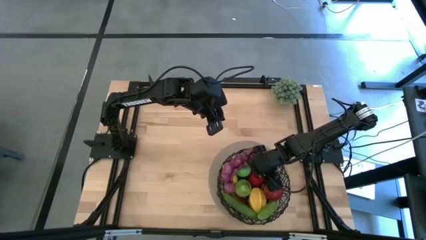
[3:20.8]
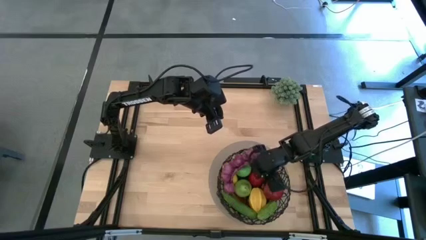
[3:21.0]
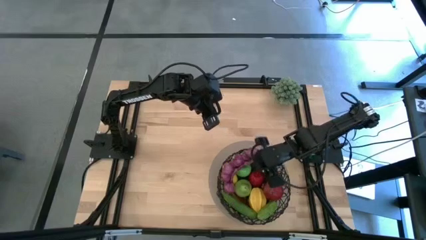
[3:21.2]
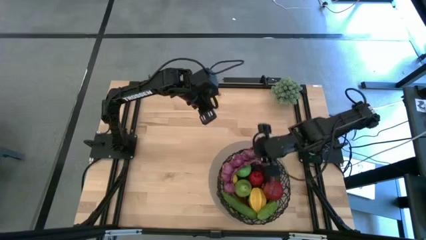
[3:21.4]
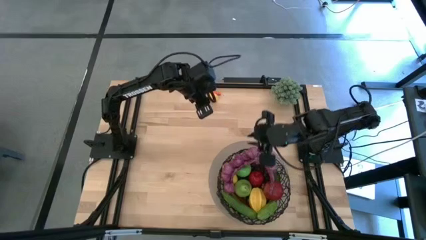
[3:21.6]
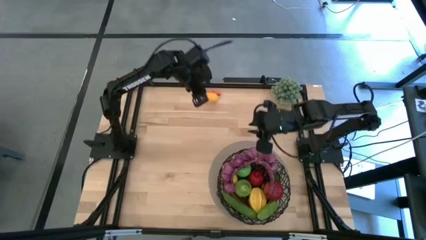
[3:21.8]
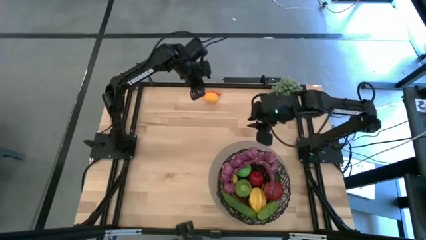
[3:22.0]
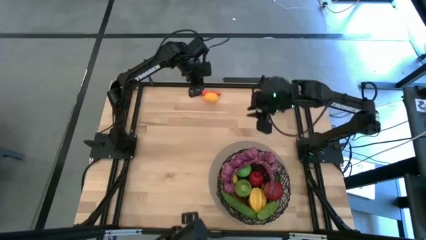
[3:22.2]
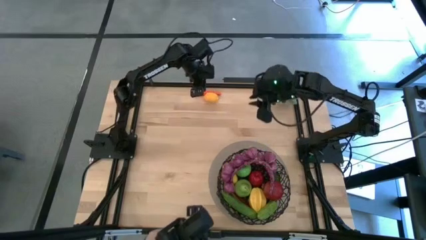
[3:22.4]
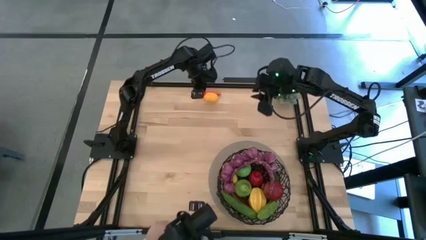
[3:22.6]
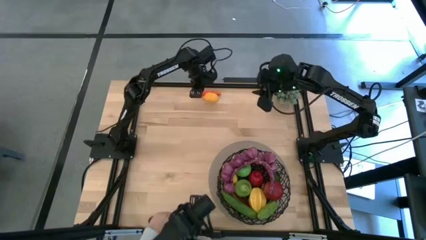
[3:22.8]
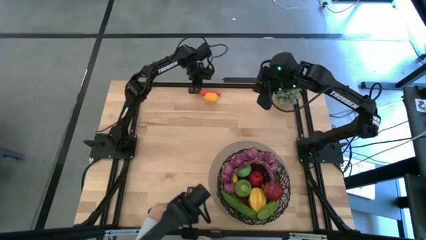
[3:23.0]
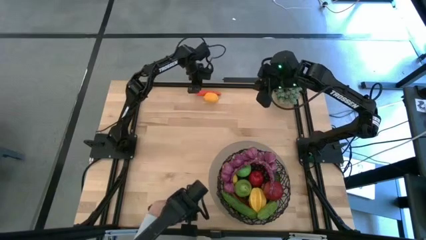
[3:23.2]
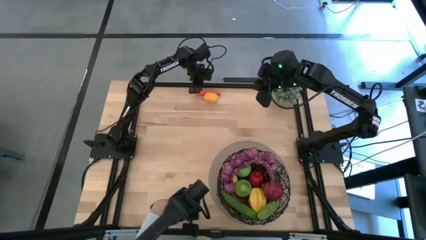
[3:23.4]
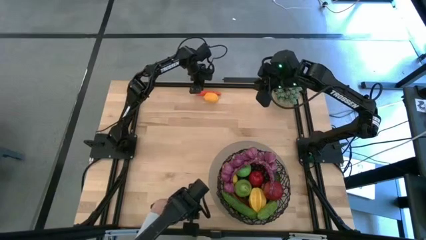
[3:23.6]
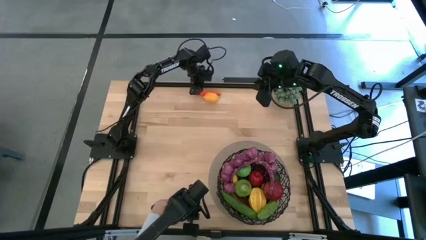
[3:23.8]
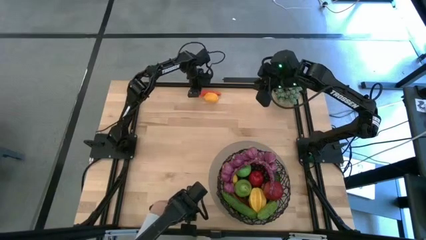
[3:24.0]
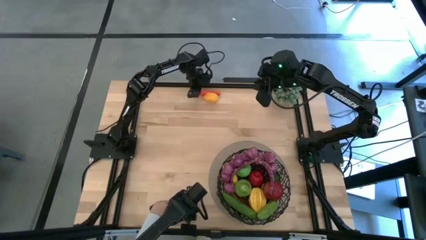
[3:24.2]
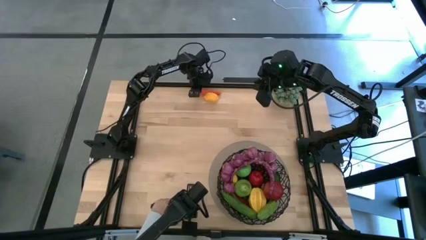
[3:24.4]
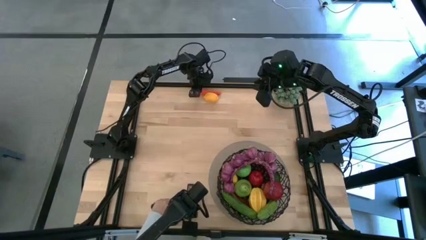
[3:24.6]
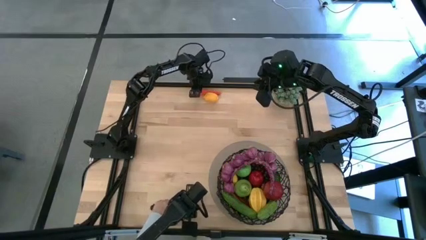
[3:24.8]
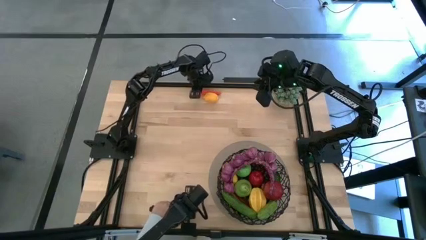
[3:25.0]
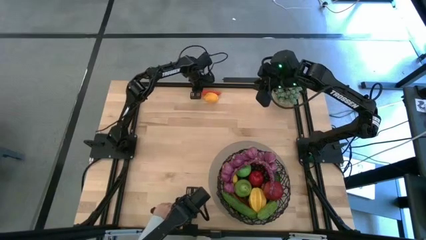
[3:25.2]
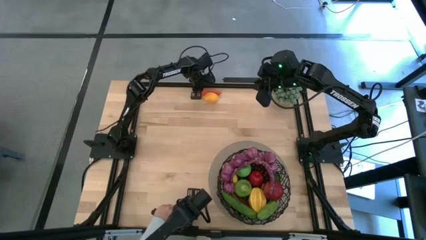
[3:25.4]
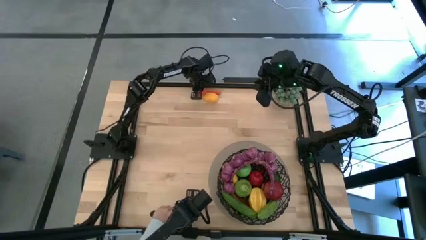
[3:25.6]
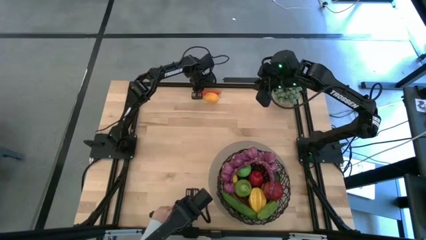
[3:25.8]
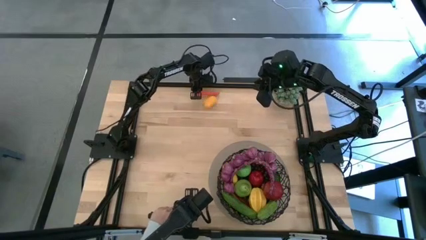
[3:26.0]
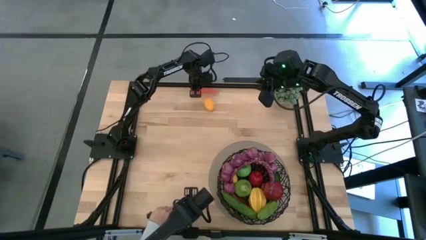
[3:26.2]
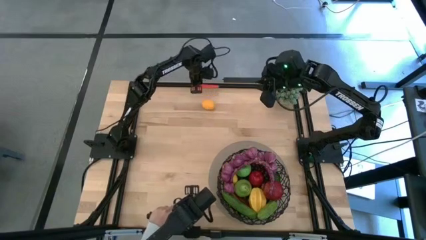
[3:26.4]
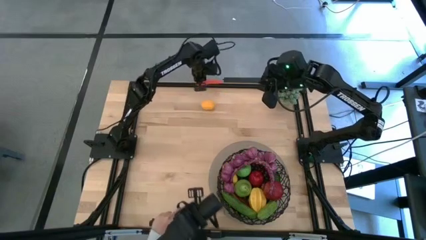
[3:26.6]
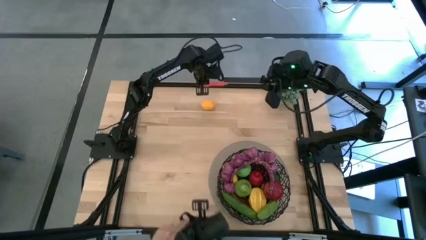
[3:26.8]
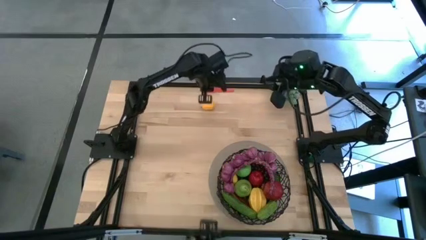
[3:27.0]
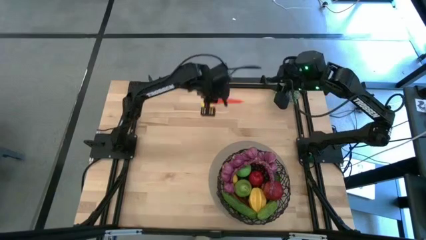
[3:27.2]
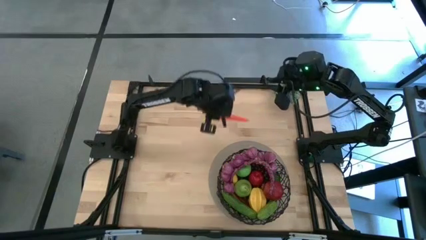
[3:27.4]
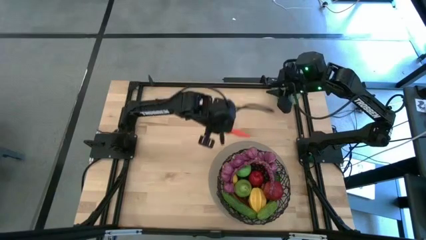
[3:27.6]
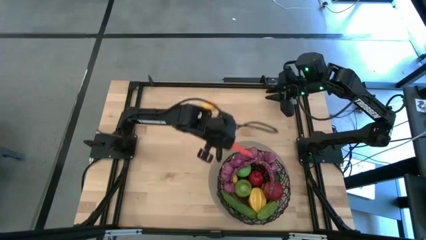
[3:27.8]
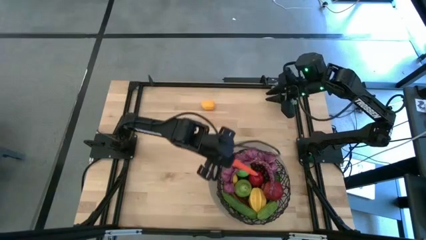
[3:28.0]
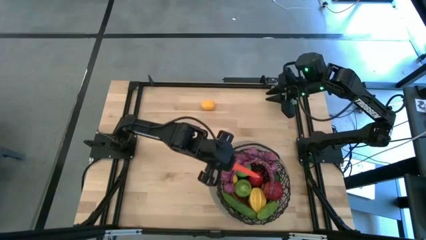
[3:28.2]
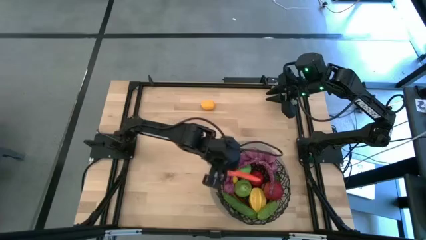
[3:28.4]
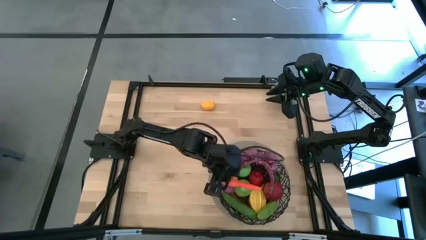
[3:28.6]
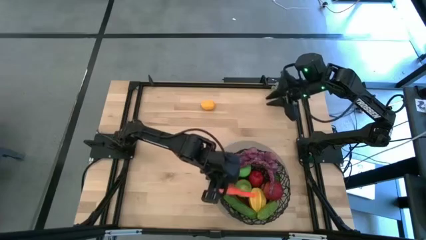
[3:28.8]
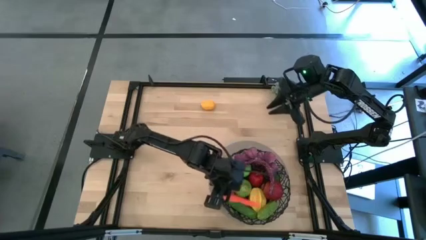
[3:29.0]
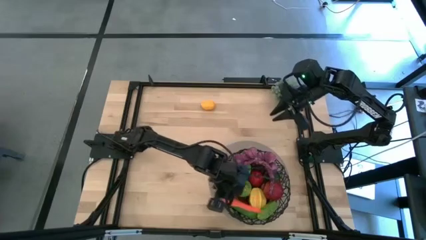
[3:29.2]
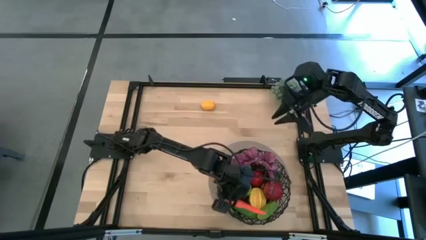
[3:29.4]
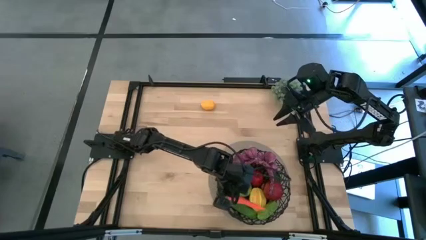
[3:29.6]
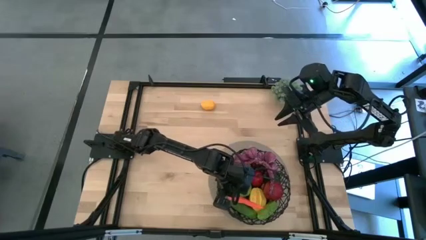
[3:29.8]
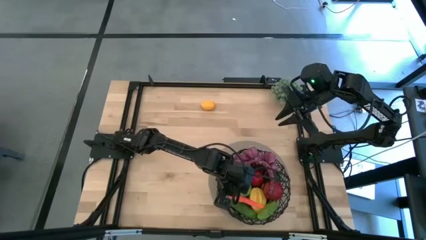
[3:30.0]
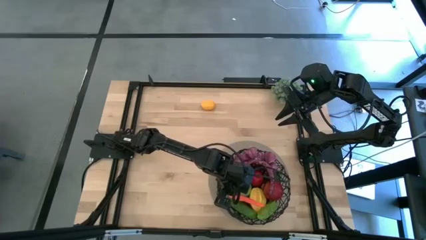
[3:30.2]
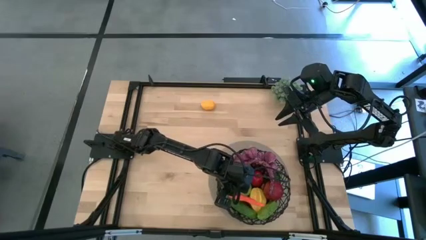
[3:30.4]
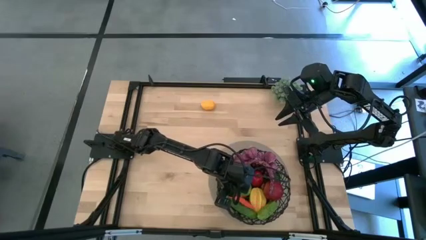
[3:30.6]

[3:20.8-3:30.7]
Task: Build produce basket
Put the orange carrot into the wire basket

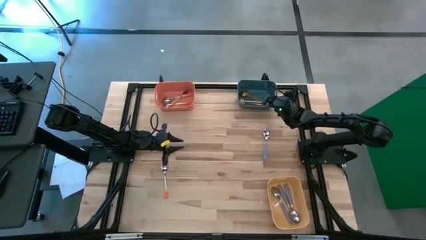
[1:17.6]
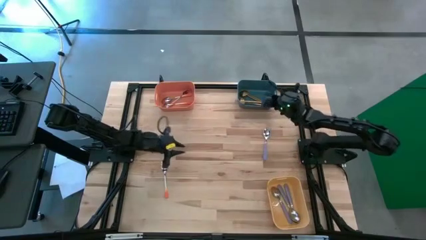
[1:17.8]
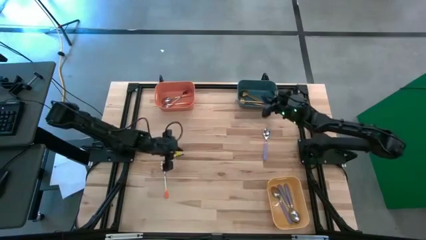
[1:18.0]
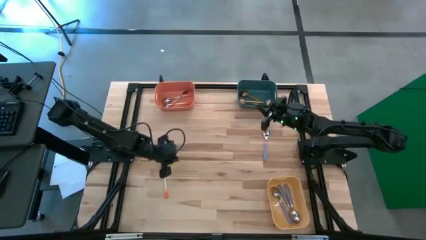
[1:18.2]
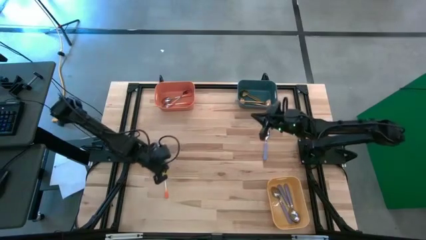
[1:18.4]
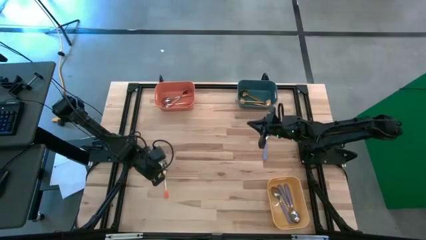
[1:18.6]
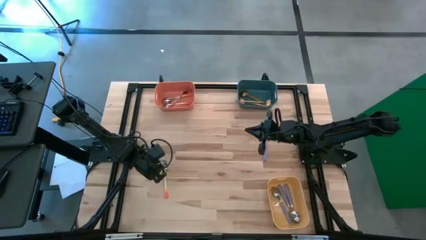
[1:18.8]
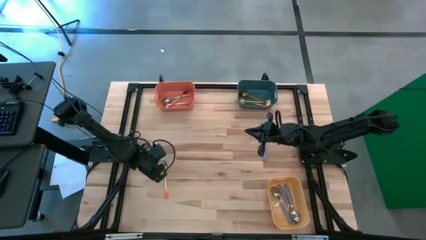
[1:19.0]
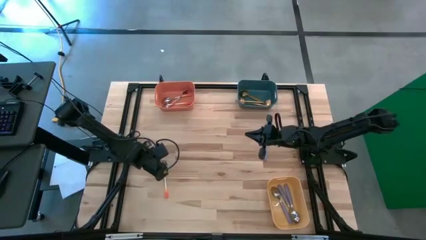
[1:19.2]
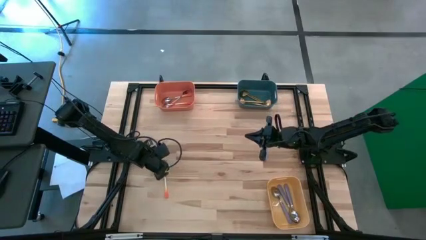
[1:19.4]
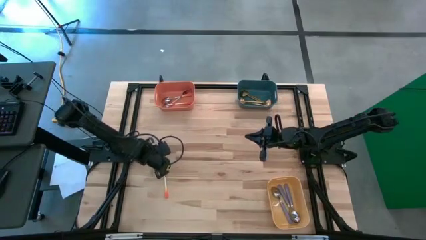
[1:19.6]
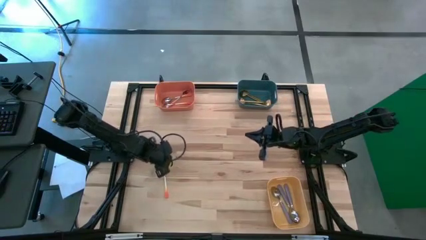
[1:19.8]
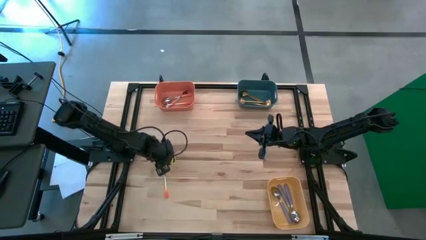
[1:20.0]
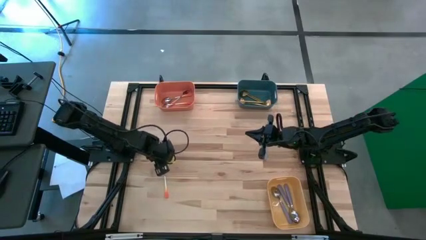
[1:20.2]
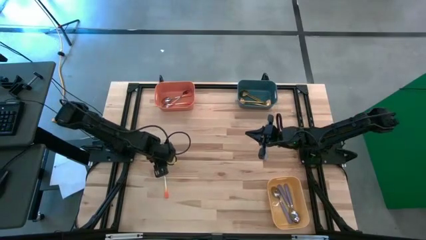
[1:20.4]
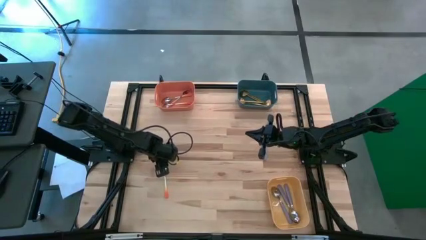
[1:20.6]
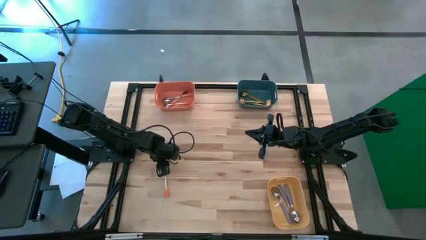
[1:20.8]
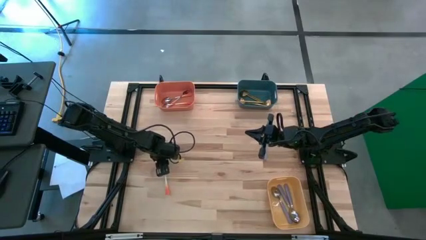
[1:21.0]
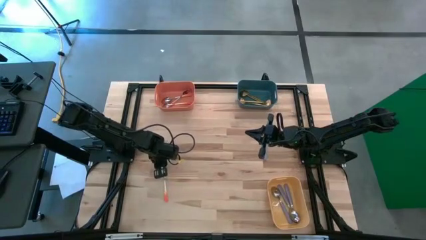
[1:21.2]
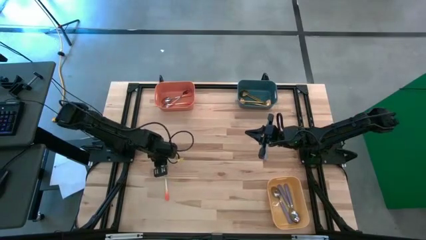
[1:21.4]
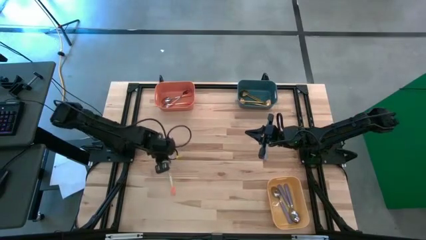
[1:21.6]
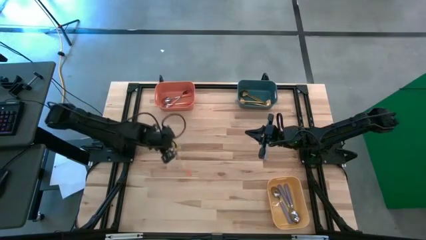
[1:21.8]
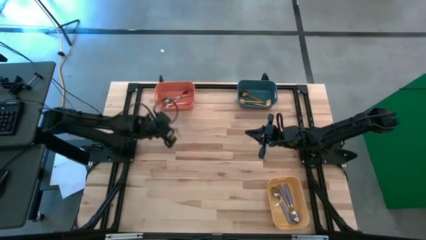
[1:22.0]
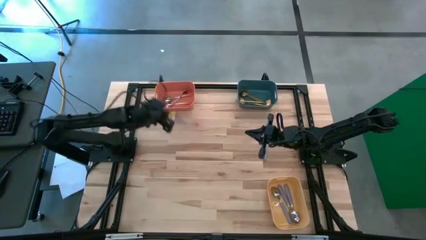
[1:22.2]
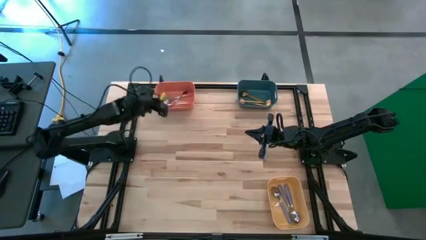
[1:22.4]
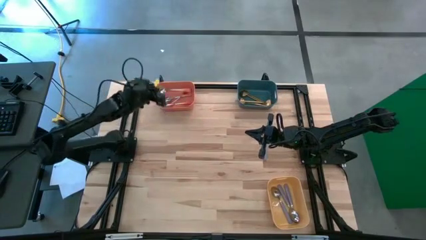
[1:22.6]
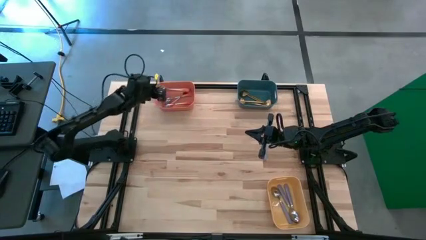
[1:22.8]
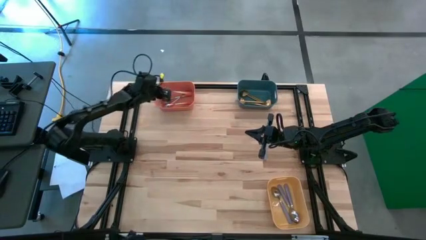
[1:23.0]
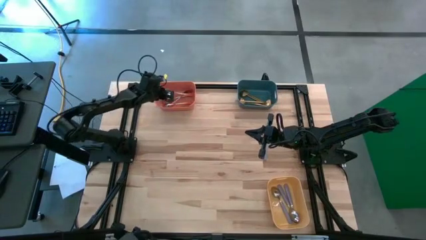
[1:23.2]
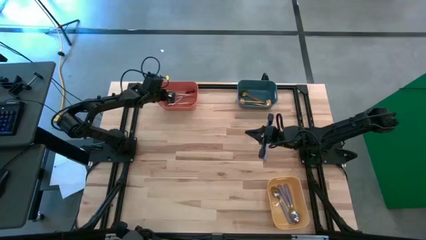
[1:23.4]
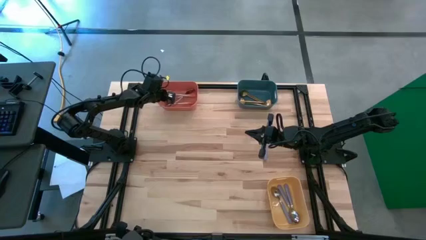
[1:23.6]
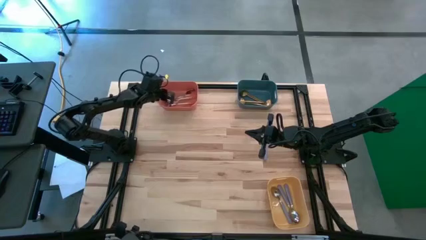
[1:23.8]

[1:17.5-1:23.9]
Task: Sort silverware by color (type)
Put the orange spoon into the orange bin
